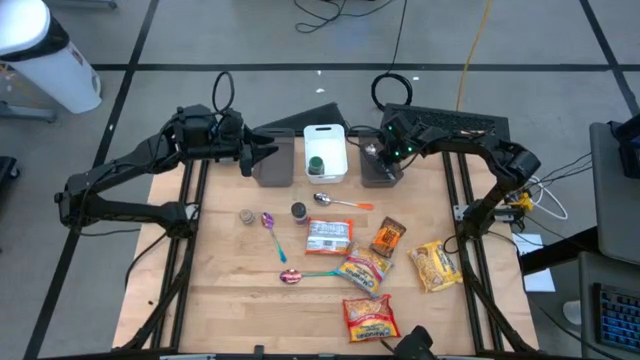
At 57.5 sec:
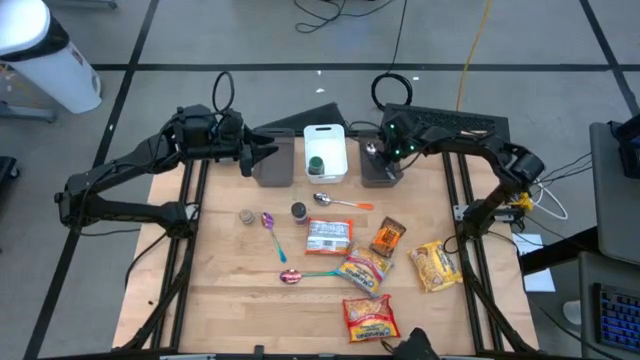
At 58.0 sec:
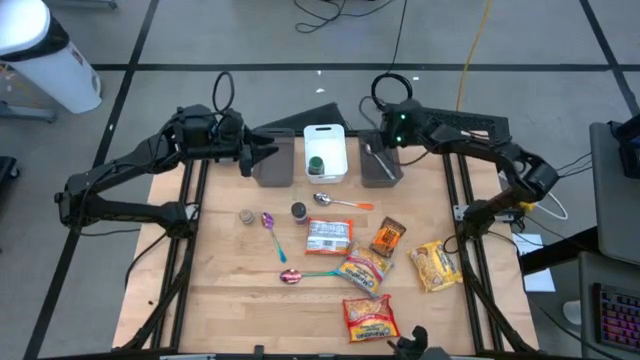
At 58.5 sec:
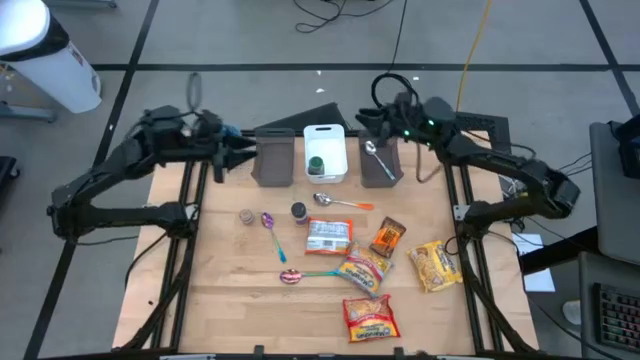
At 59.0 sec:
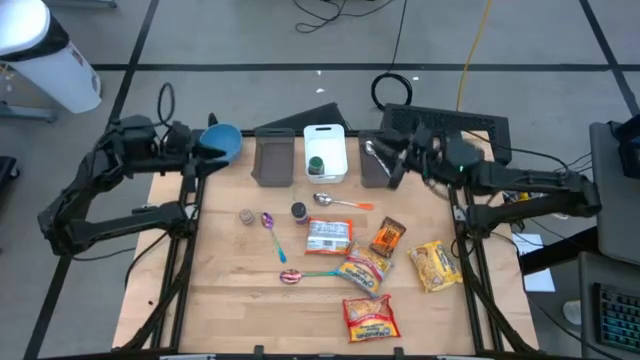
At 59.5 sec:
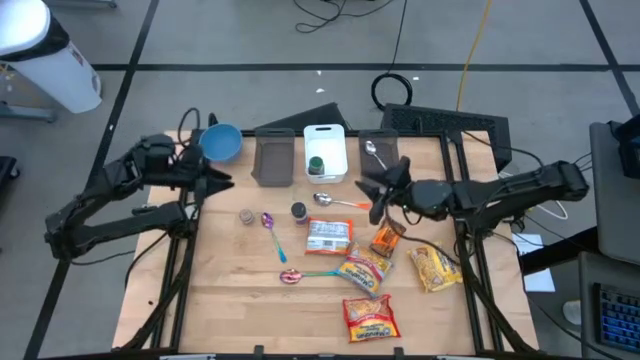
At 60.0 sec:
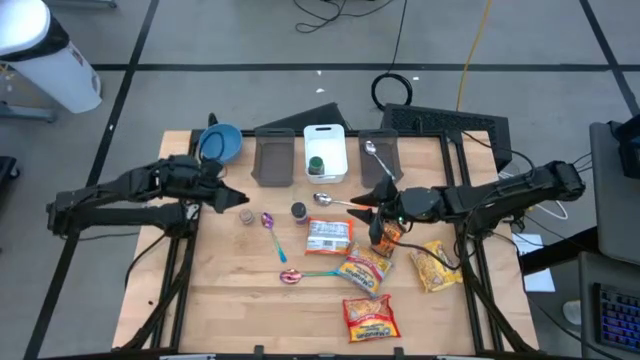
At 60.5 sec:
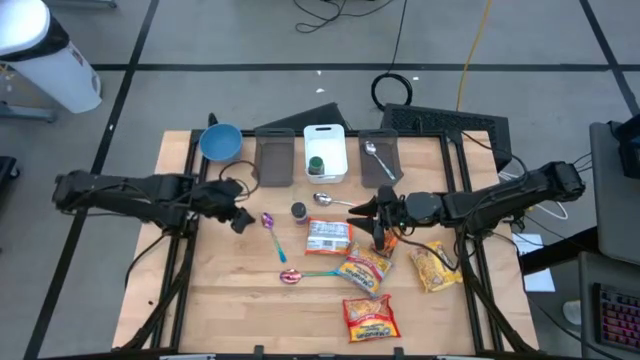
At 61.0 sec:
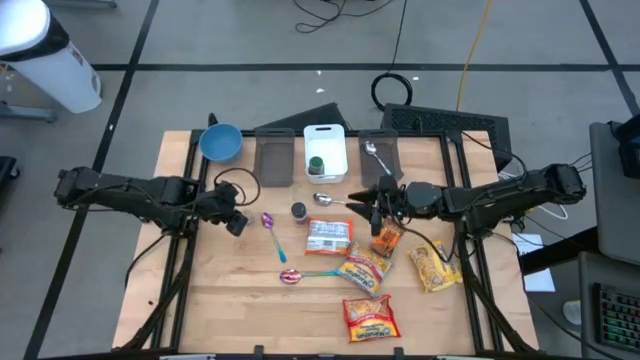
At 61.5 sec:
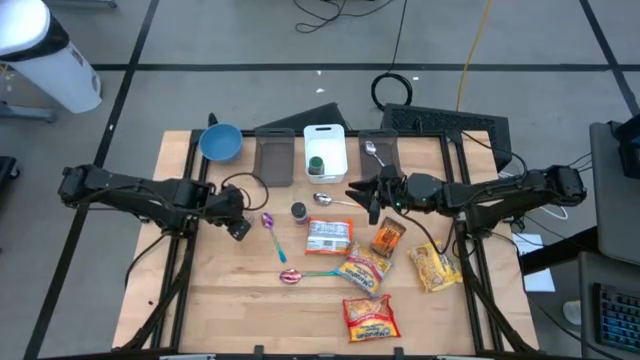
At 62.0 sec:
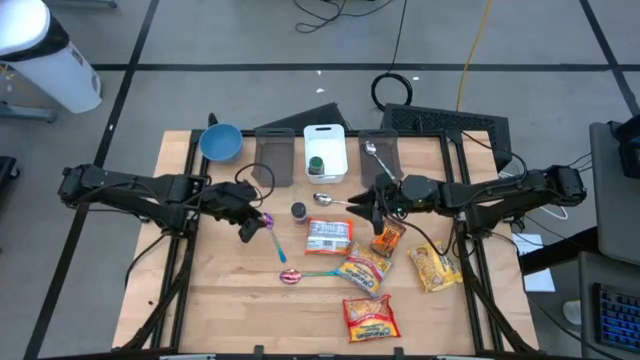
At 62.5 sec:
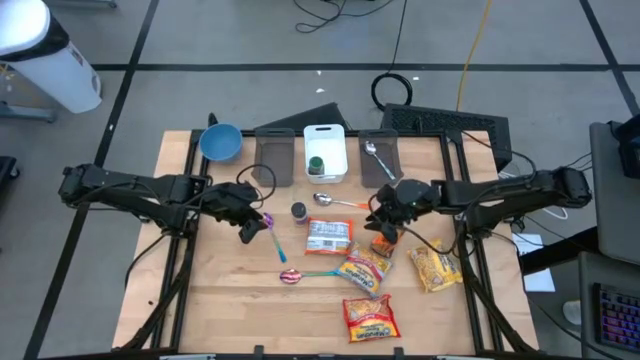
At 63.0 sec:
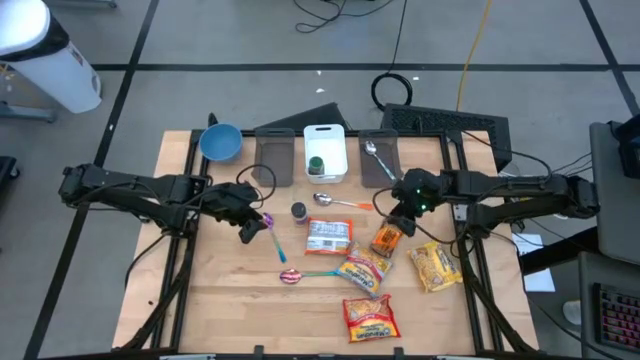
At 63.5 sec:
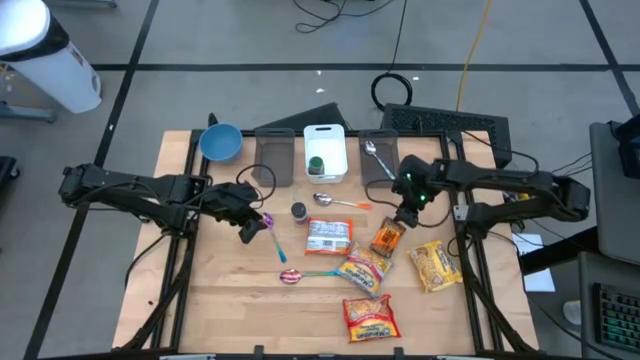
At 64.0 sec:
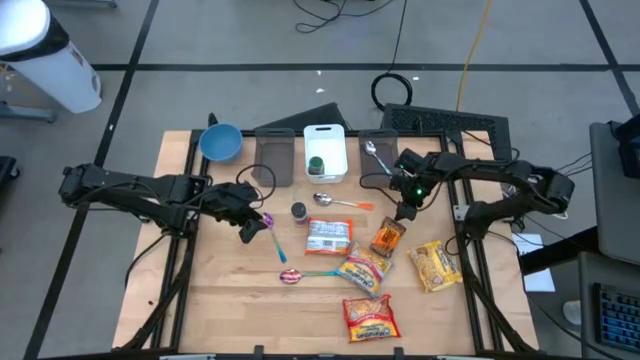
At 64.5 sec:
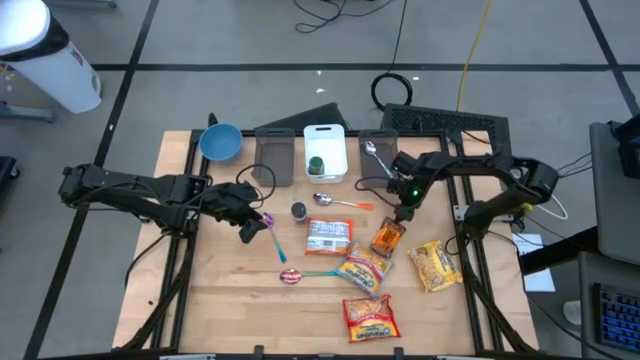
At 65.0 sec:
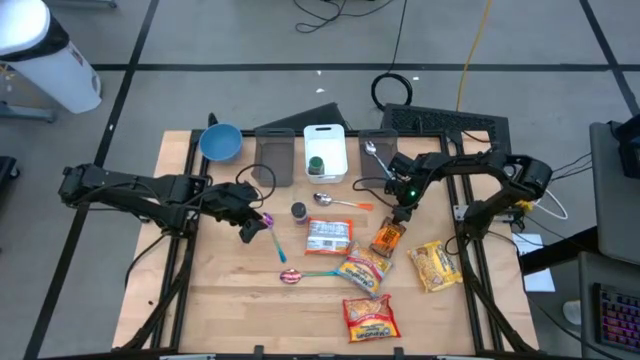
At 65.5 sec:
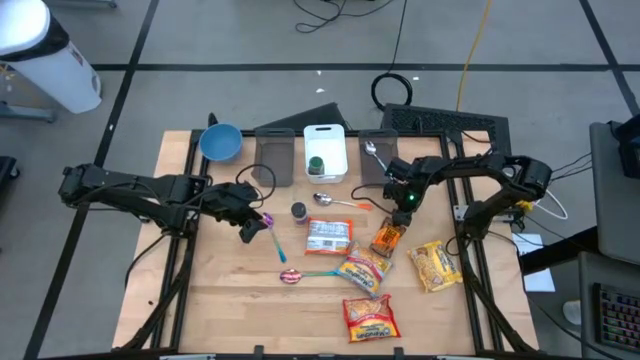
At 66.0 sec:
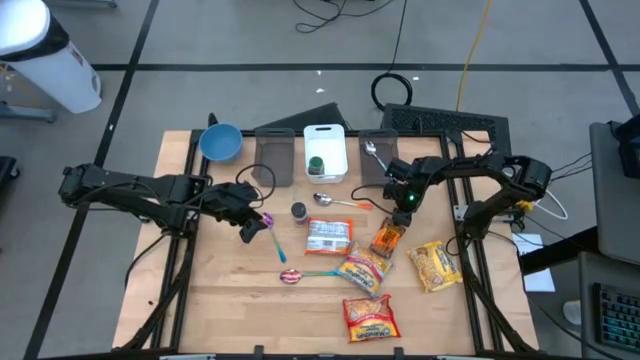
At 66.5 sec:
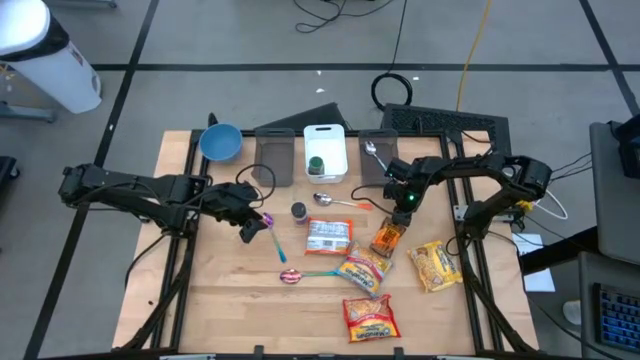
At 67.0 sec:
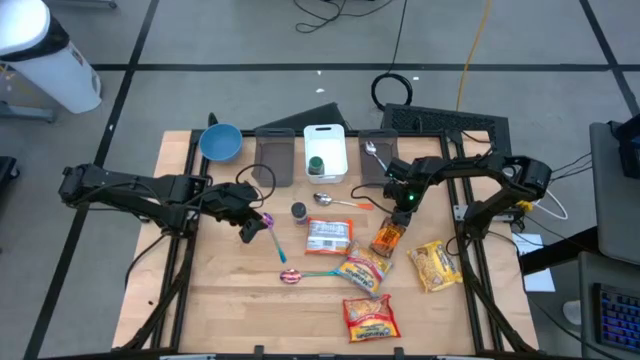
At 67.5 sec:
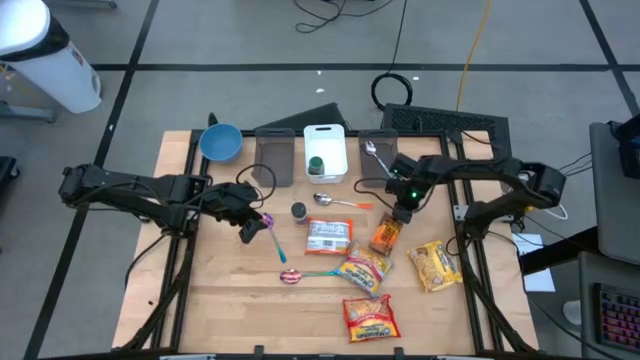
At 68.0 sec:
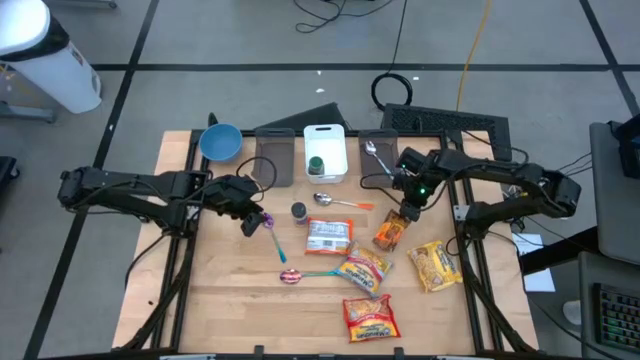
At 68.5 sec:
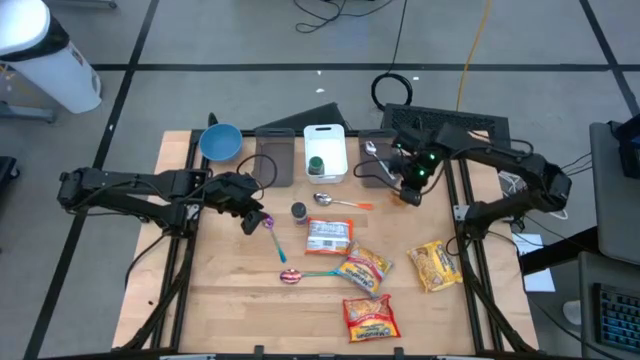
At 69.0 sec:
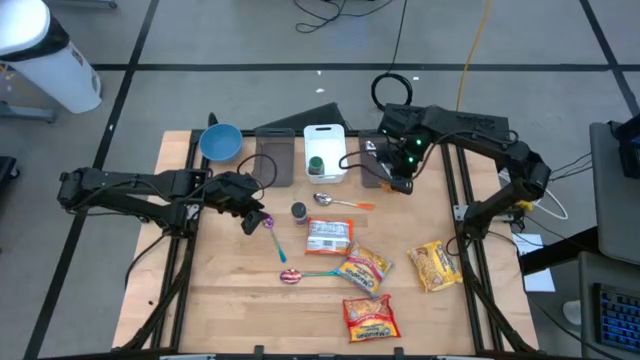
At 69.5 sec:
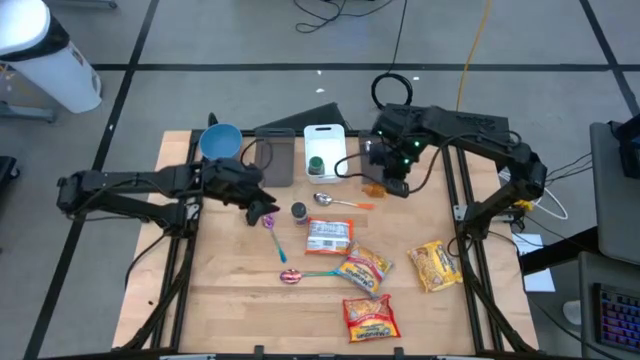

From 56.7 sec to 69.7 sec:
Task: Pick & Place Food Item
Put the orange seasoning pack into the white bin
